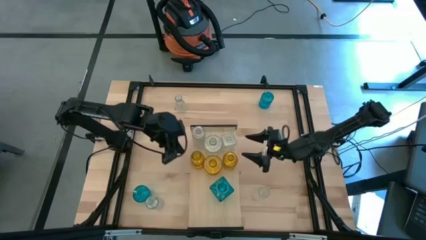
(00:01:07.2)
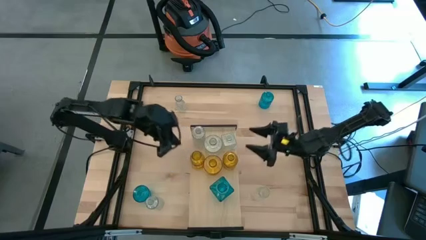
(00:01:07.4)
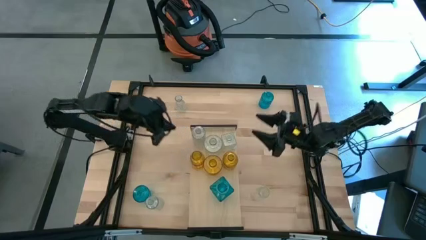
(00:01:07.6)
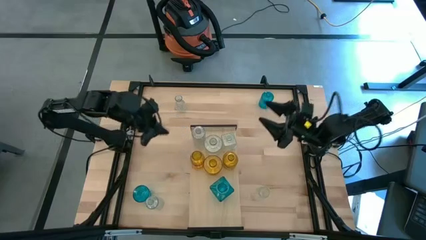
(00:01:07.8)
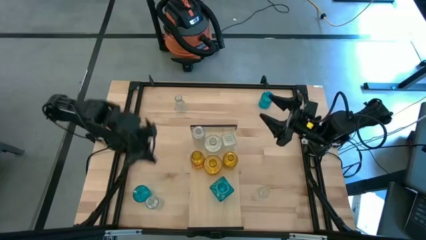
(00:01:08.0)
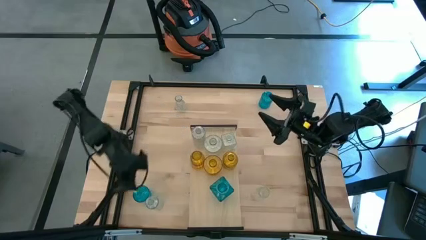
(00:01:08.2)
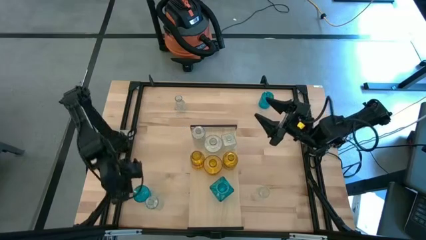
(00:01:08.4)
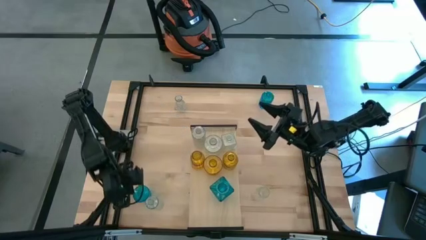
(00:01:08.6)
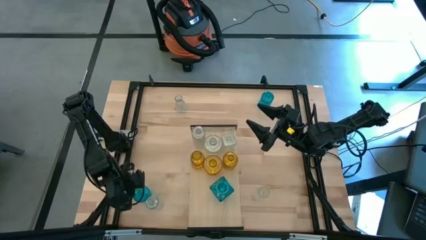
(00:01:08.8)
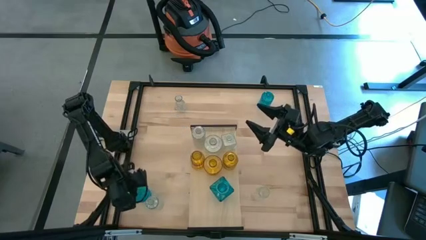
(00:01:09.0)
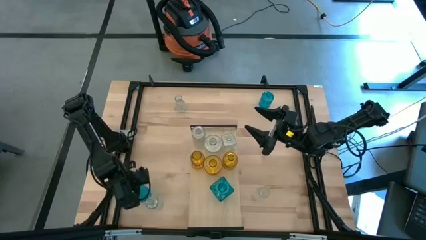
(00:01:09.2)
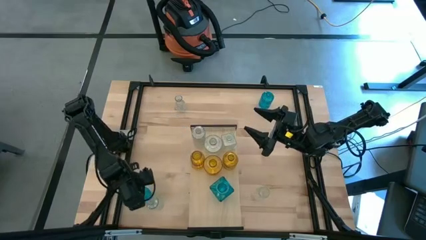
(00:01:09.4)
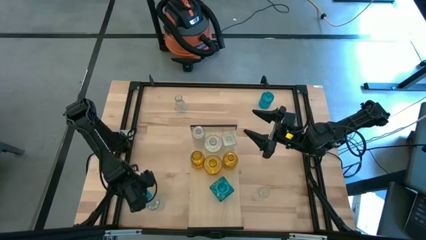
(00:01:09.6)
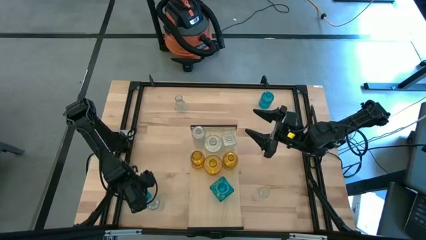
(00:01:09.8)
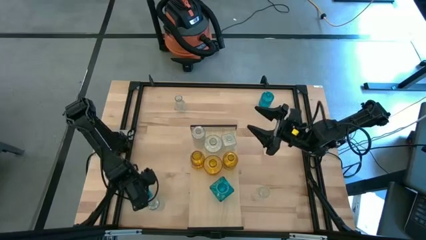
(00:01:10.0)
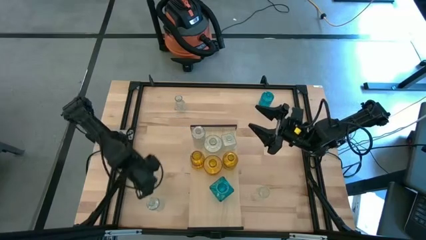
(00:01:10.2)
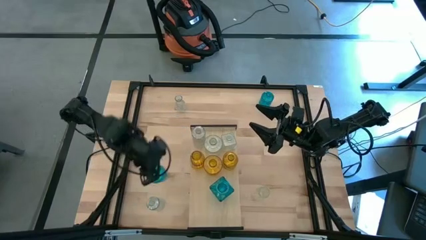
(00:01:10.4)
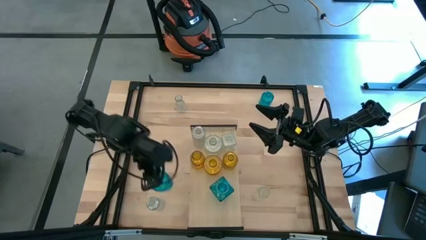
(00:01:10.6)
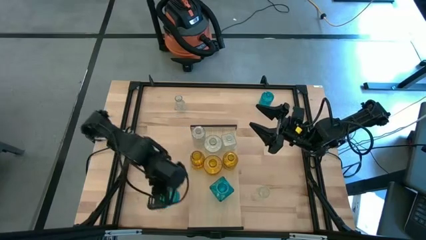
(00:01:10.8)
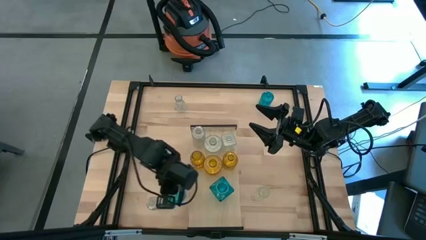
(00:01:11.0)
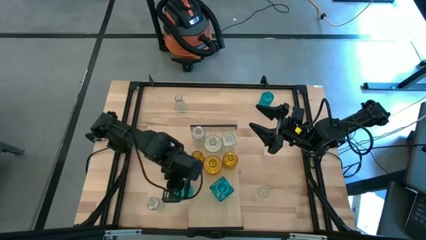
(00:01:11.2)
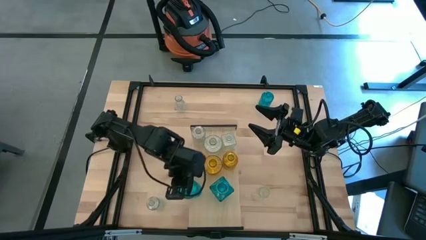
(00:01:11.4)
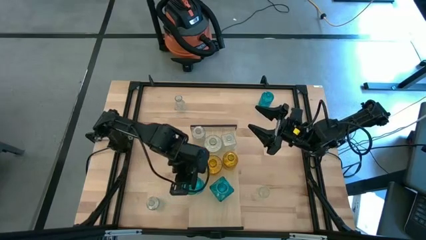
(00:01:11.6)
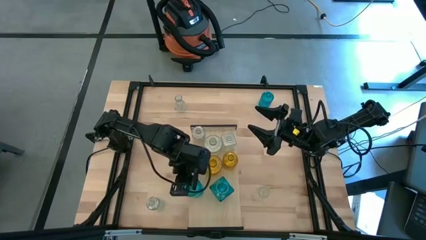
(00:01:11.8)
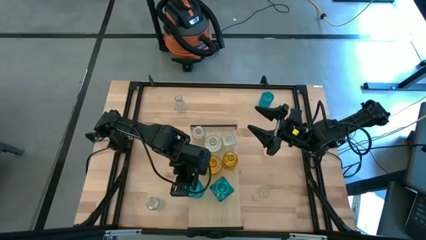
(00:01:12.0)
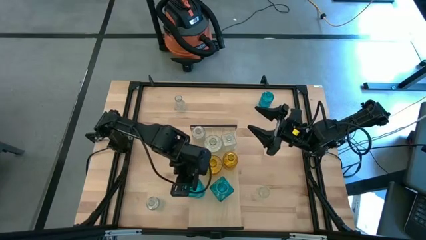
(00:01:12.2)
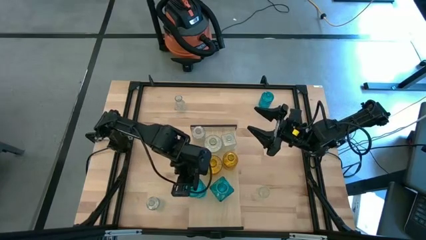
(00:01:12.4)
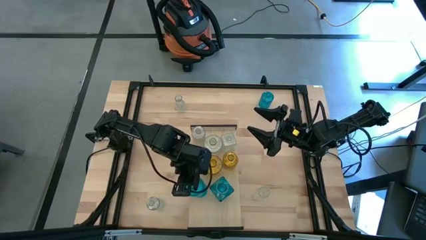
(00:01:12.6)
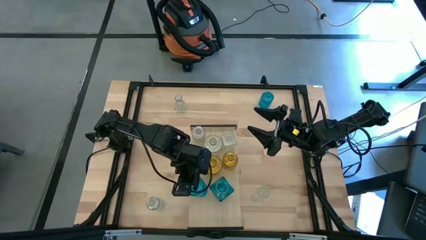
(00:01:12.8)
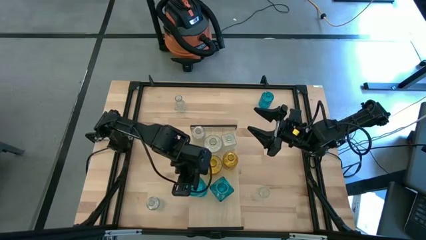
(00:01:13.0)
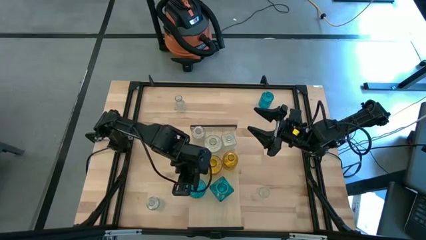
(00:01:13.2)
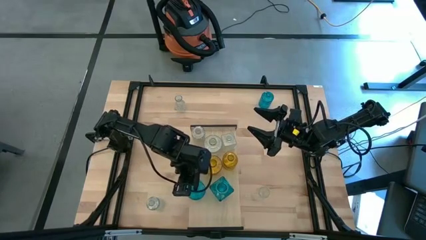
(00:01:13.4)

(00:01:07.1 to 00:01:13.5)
Task: sort vases onto shelf
Put the blue vase on the shelf aligned with the other blue vase

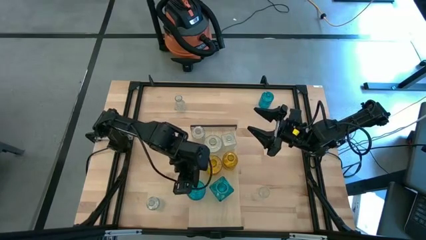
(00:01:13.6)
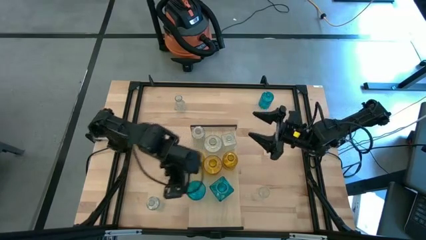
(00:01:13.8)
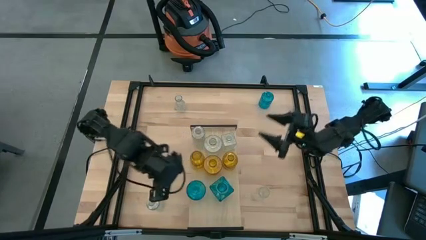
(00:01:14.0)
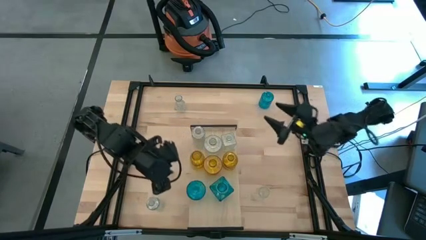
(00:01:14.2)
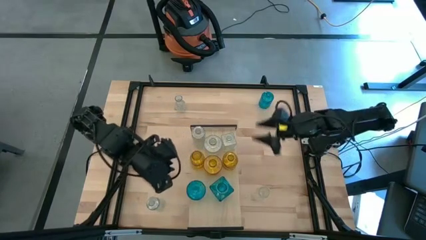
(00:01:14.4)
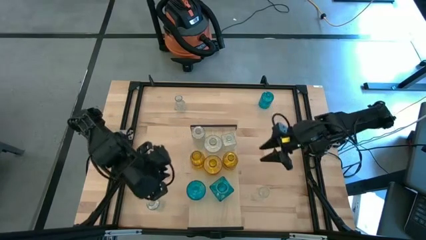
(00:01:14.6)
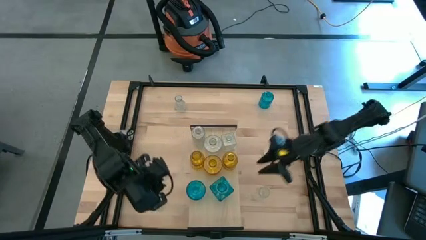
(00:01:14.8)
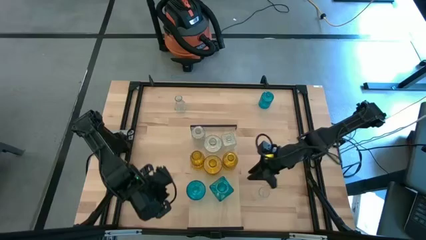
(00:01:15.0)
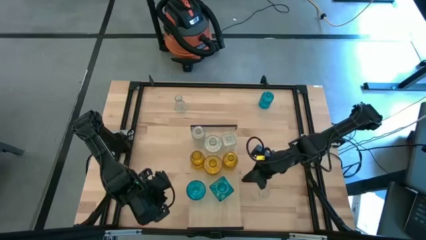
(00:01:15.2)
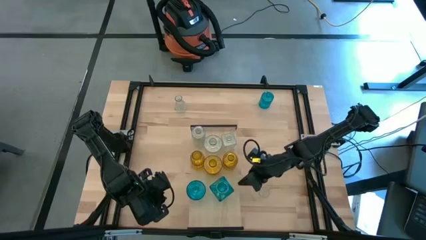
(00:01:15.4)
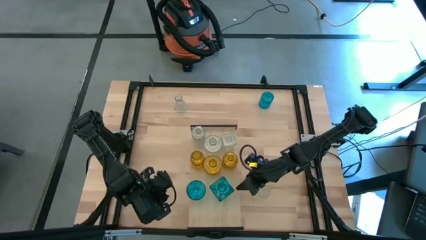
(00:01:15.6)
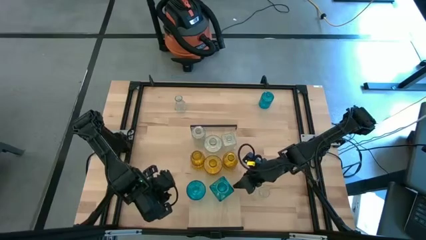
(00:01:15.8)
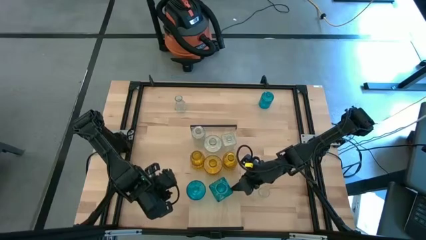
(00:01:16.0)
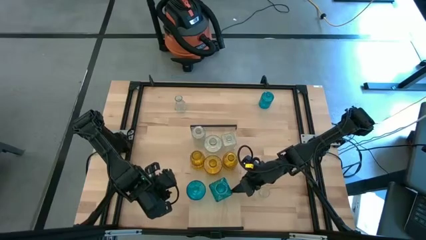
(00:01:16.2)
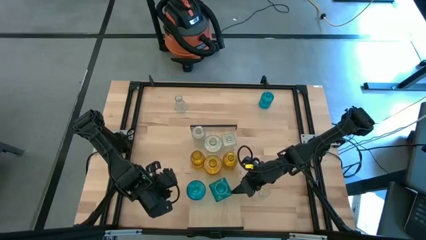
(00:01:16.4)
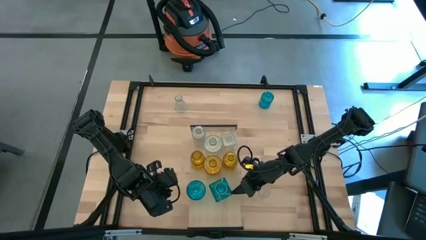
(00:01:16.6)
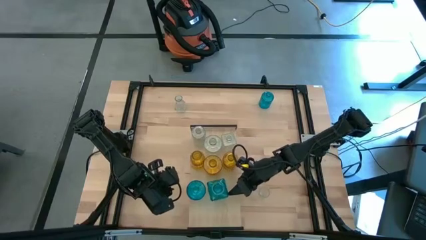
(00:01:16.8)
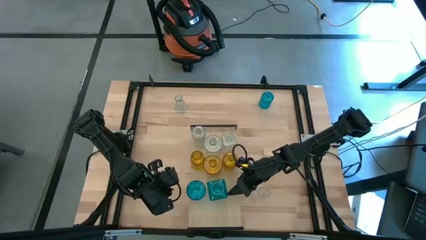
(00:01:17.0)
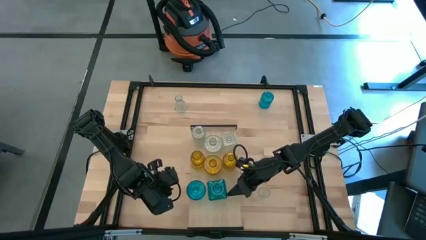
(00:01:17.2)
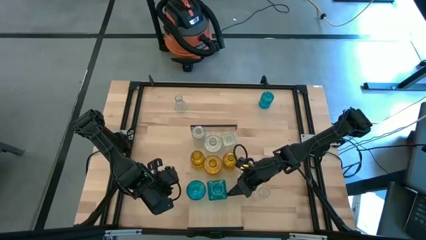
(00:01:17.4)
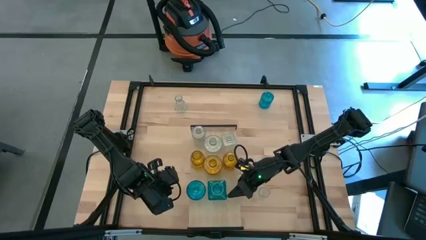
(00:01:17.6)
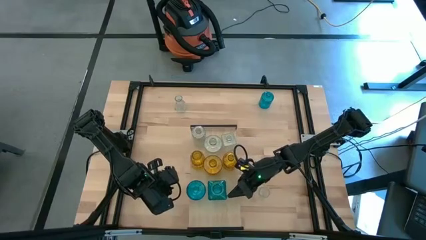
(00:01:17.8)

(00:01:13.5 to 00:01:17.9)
Adjust the blue vase on the shelf

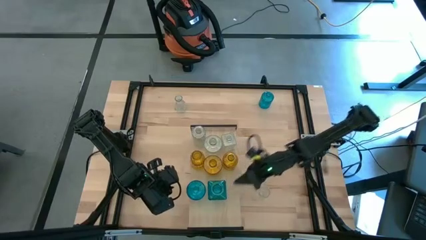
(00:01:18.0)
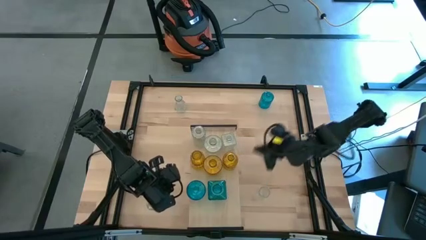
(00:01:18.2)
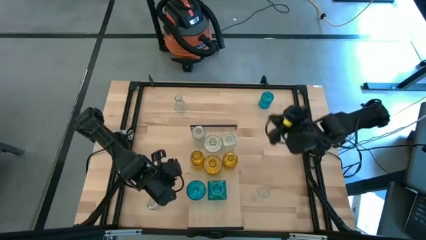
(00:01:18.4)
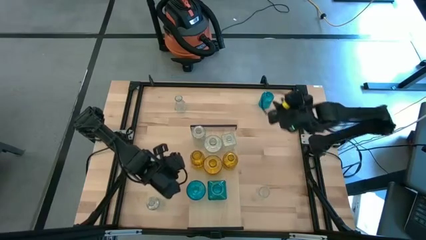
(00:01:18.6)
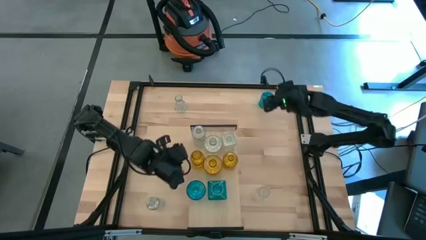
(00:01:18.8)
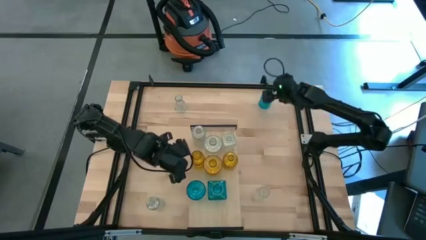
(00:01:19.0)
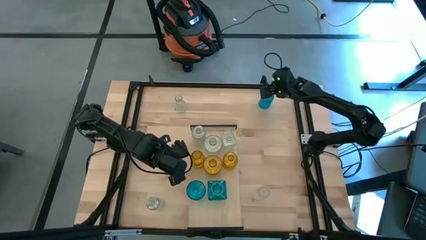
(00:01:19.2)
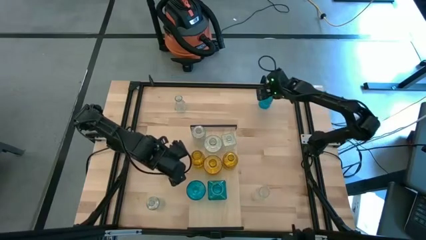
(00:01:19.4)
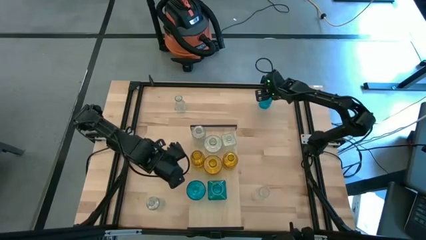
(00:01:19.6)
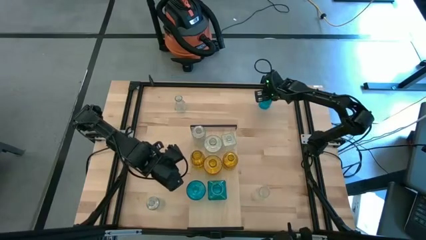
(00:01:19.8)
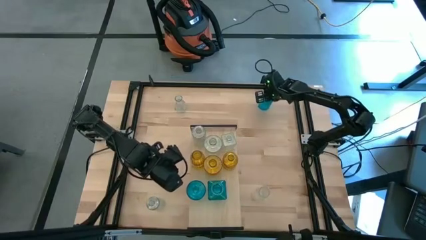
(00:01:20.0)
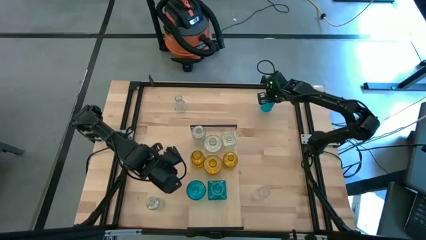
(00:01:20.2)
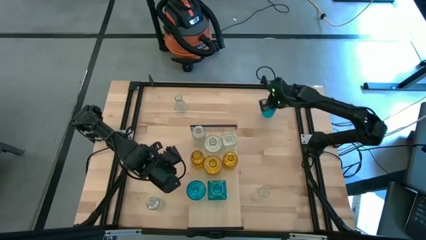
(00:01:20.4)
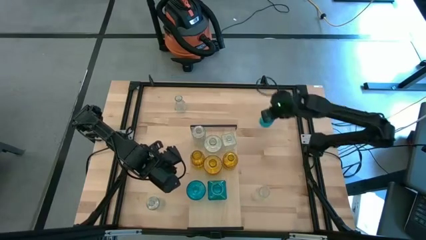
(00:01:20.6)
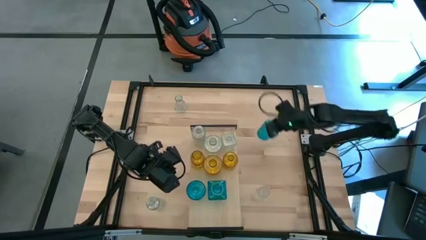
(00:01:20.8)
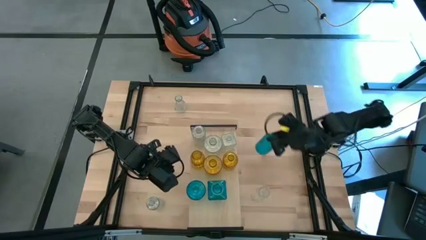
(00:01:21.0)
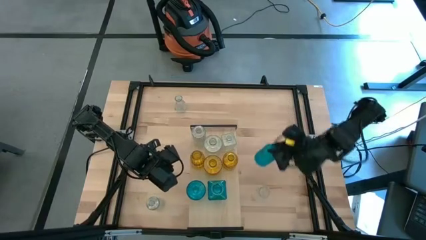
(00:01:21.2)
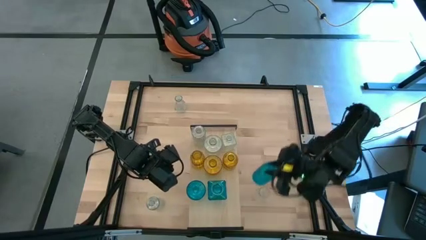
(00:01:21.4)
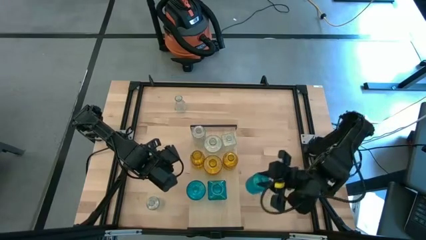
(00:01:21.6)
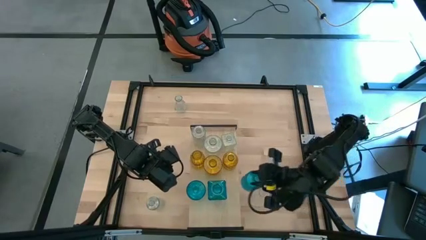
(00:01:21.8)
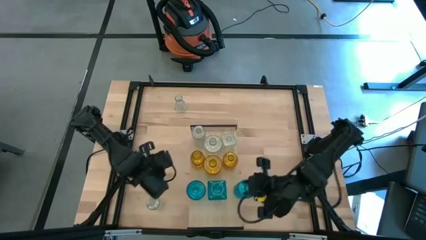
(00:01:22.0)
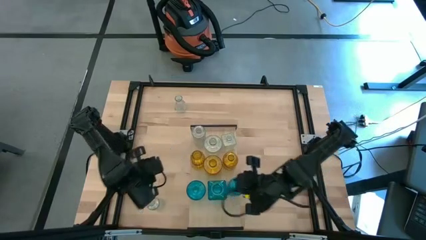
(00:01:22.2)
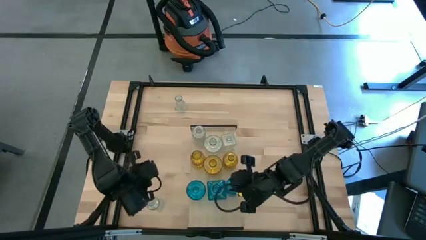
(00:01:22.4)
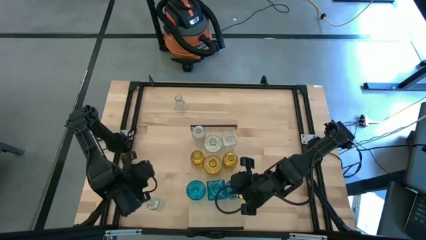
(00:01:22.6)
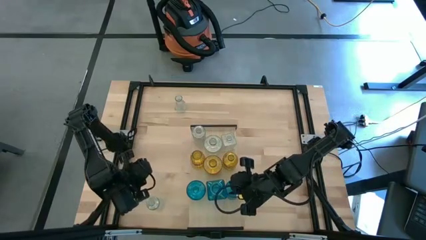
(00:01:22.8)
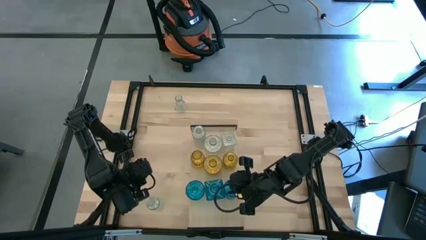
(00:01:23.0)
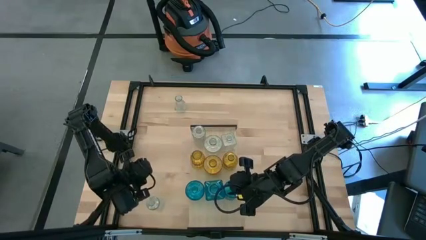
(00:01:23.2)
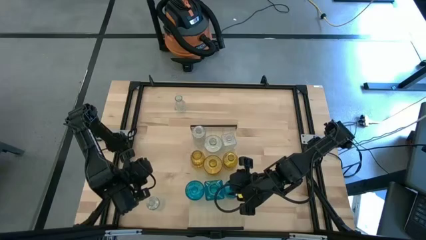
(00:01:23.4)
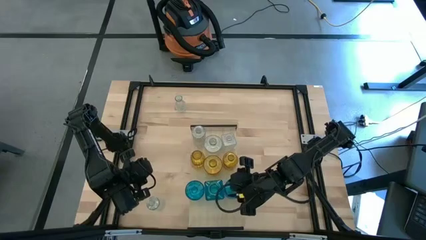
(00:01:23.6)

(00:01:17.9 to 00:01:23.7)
Put the blue vase on the shelf aligned with the other blue vases

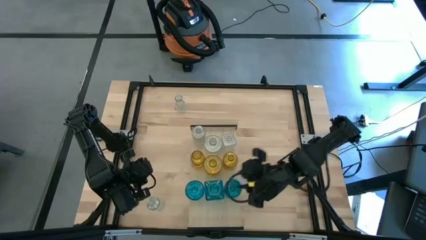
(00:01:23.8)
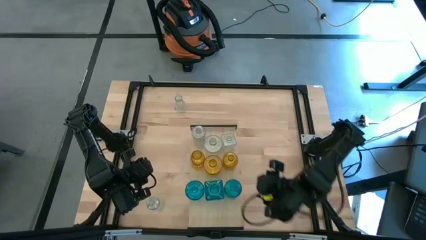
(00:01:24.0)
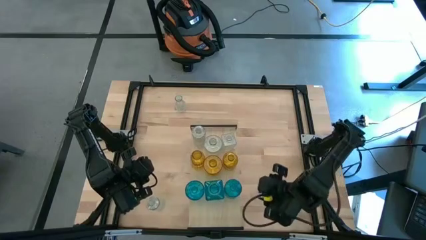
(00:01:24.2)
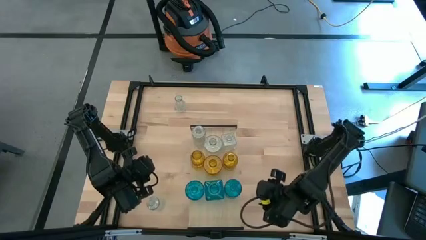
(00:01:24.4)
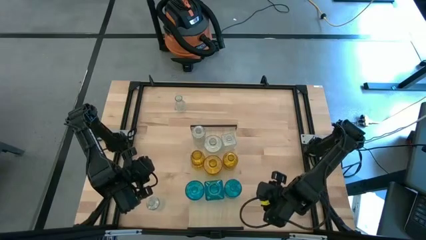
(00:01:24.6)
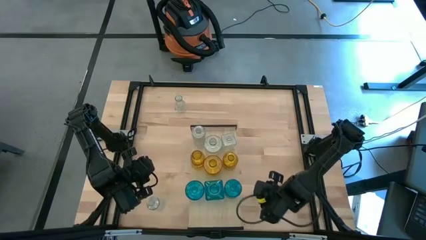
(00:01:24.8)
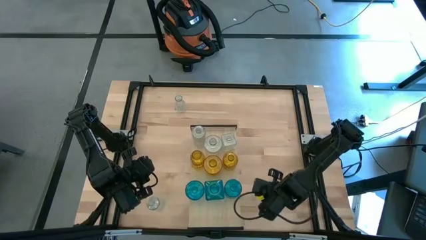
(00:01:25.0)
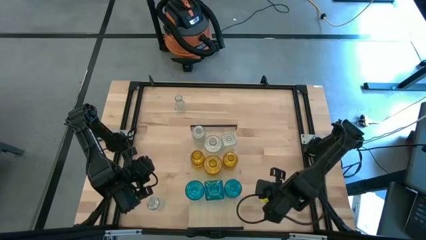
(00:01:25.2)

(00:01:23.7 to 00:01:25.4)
Put the transparent vase on the shelf
